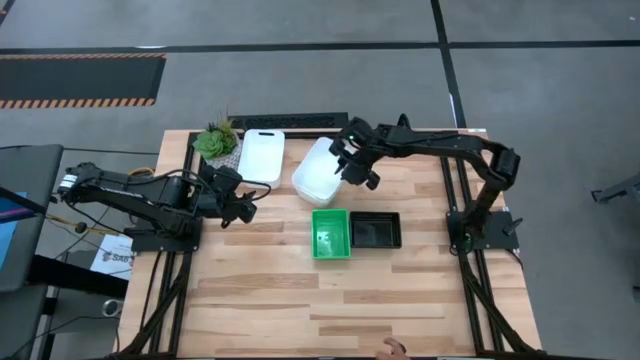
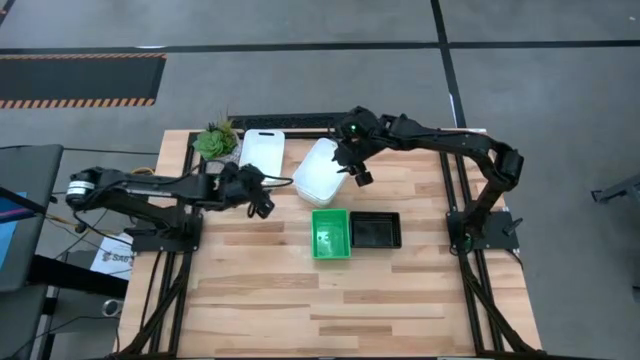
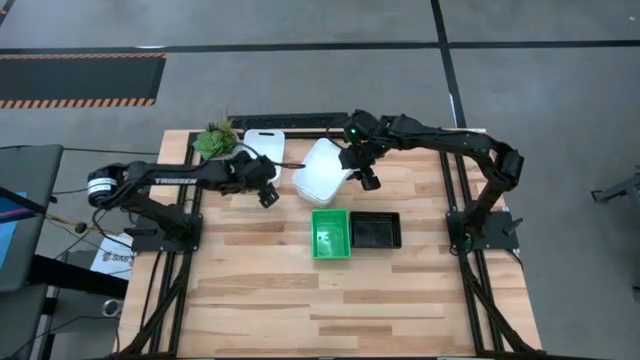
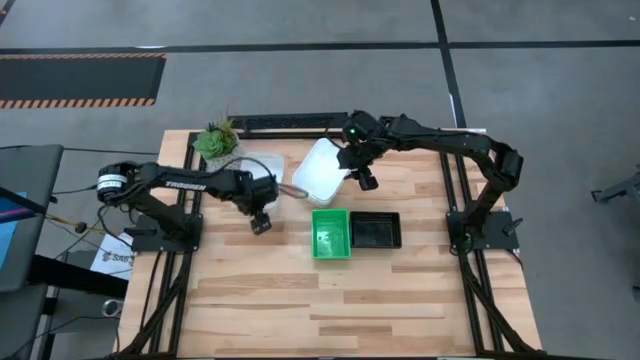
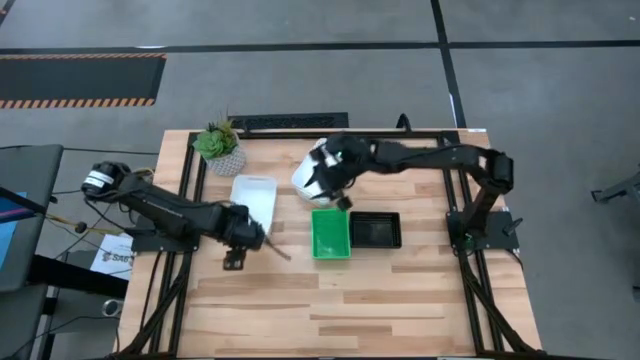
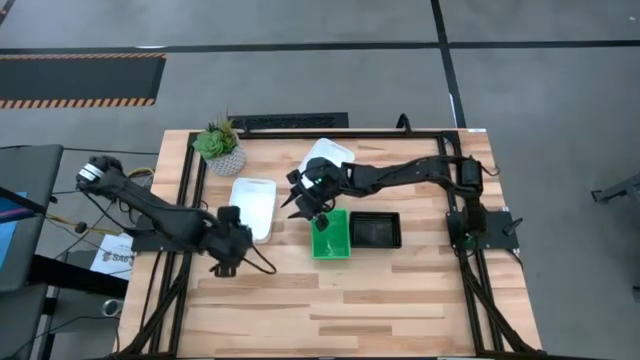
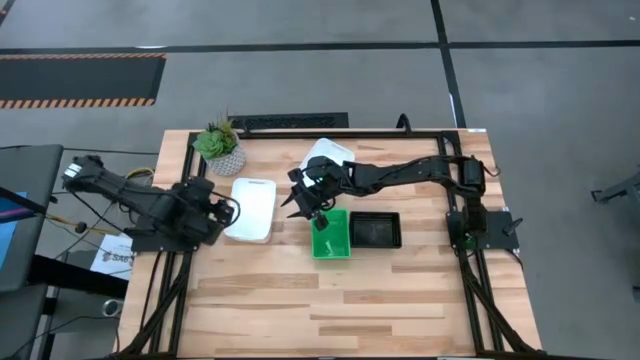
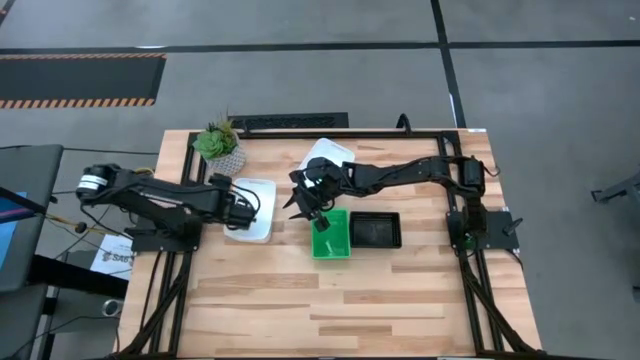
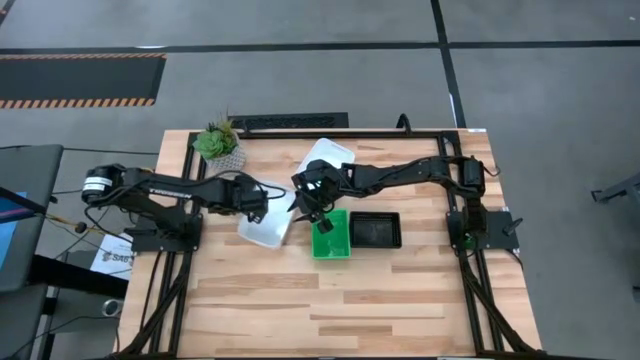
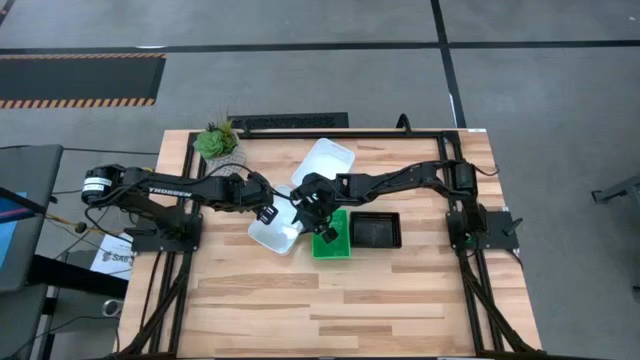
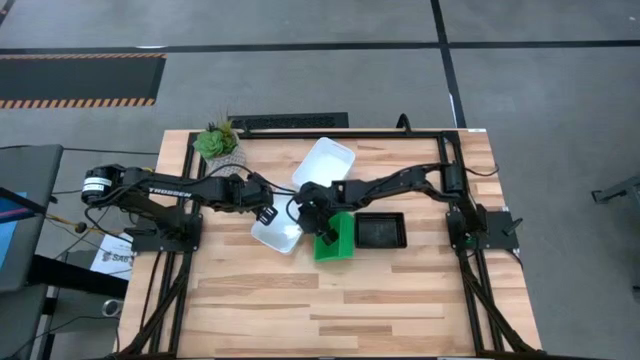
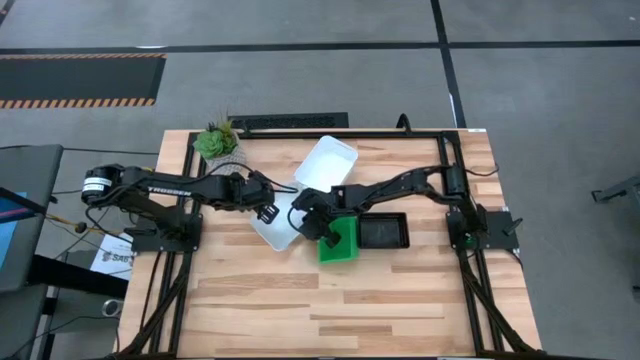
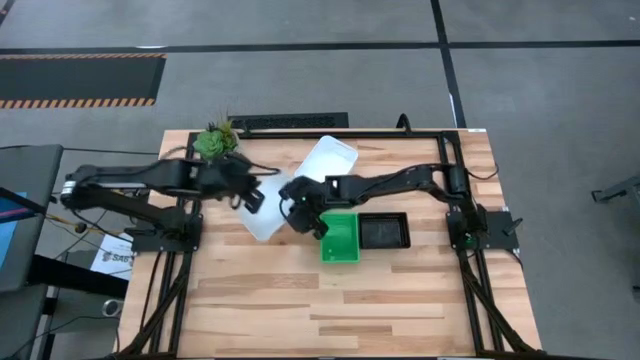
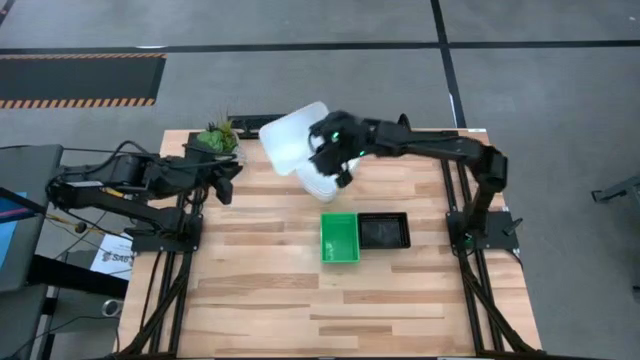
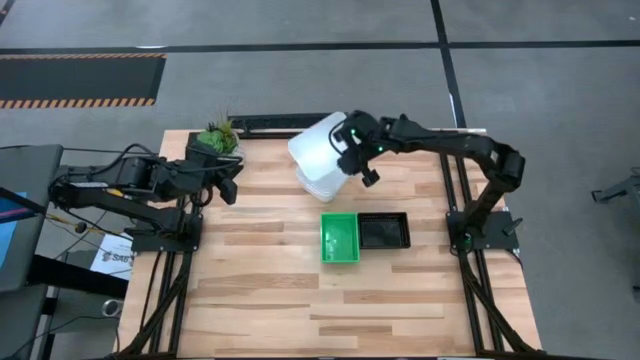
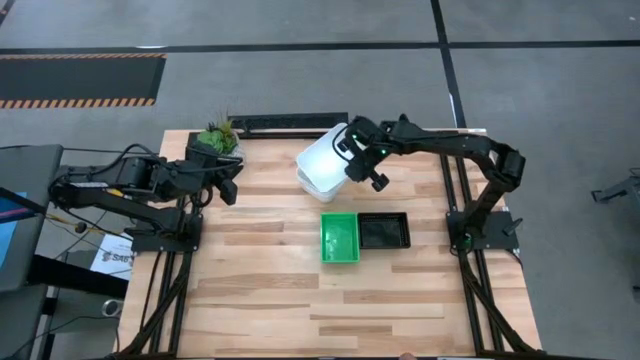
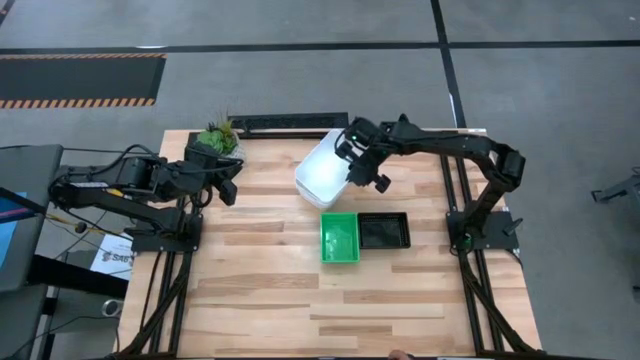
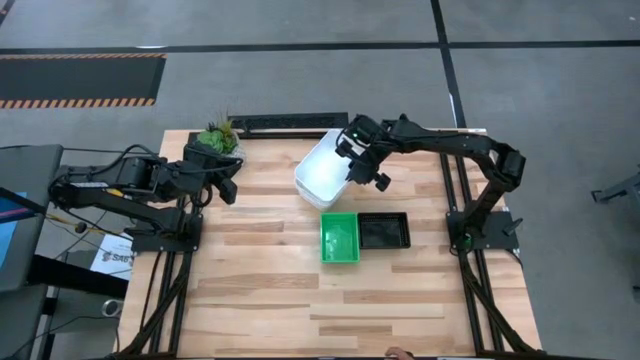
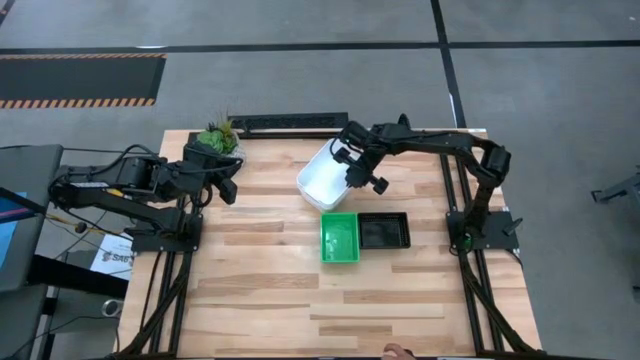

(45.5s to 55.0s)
Stack the left white bin on top of the right white bins

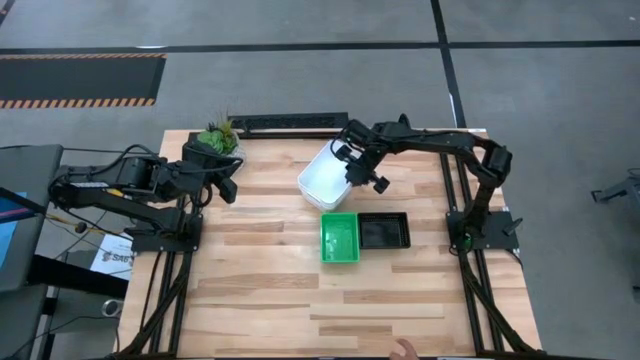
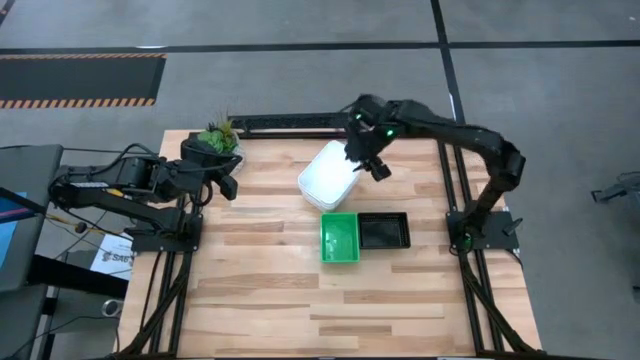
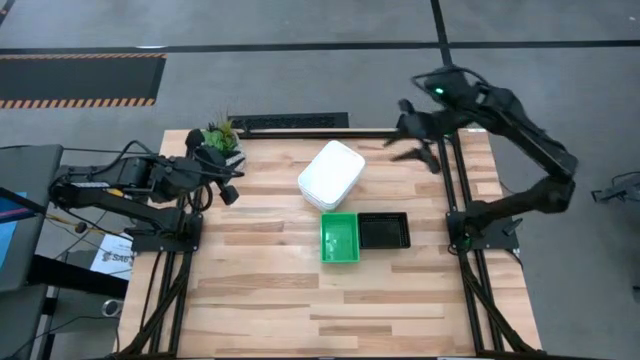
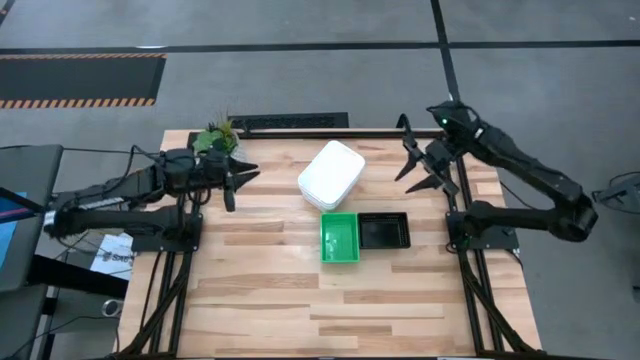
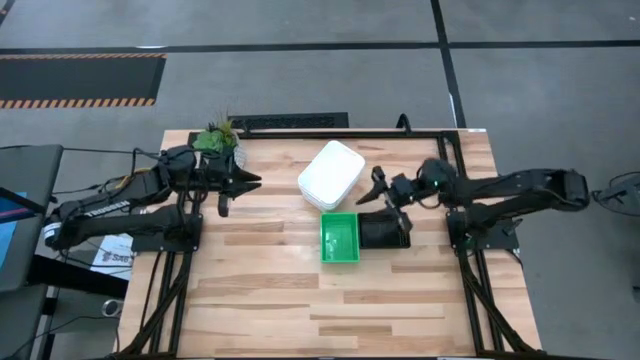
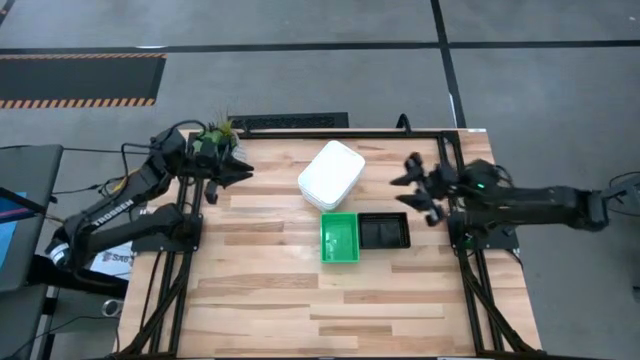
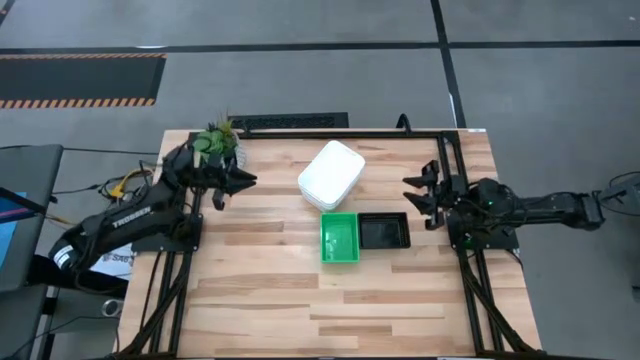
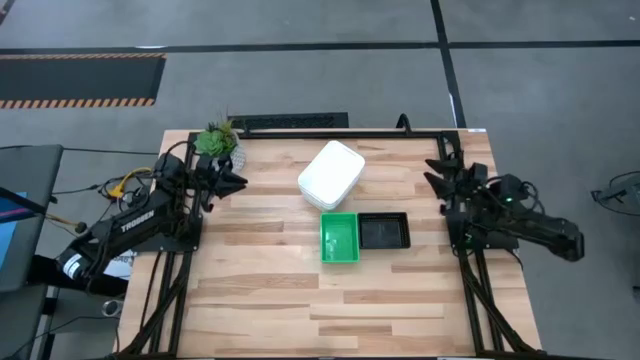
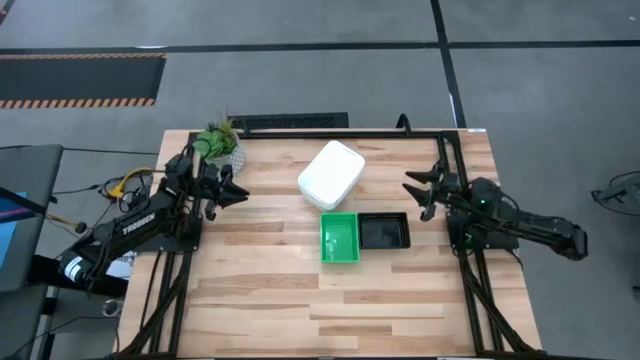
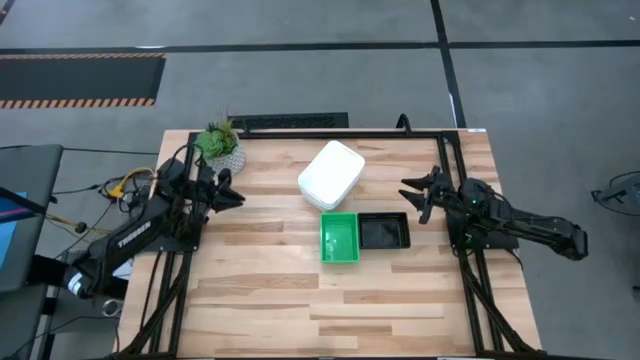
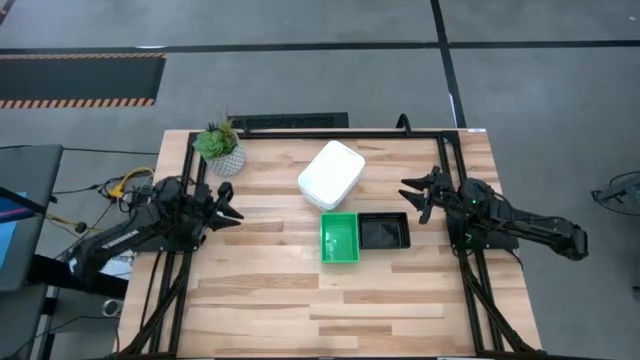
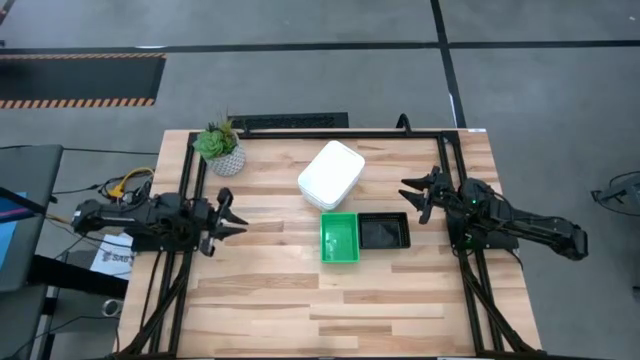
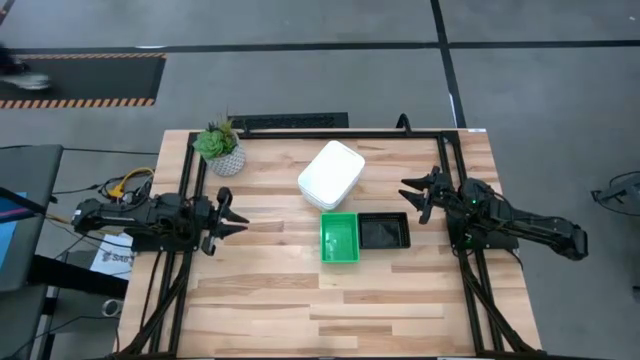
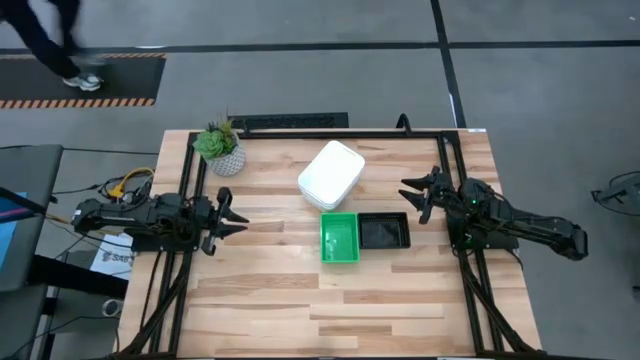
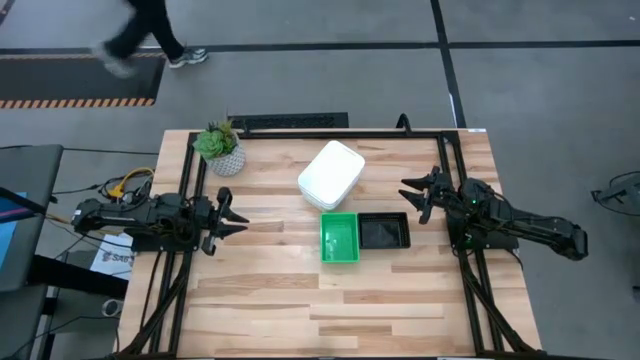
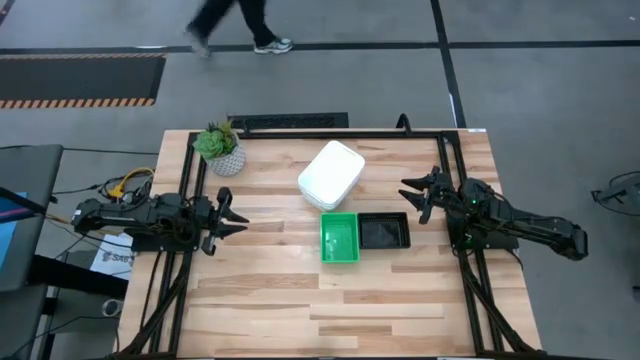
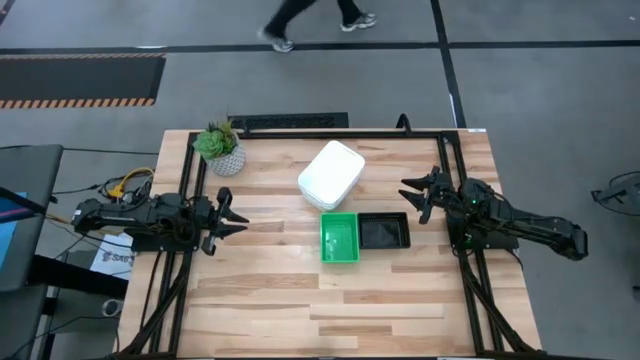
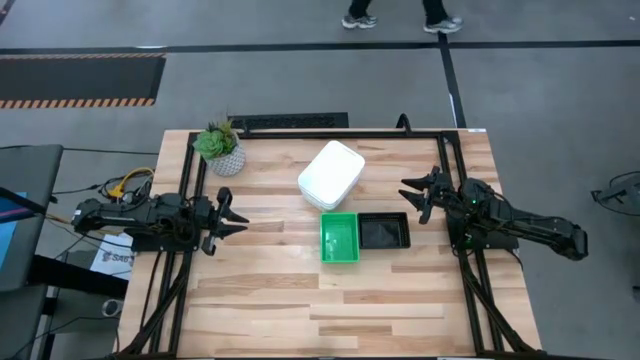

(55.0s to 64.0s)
Return to Home Position
